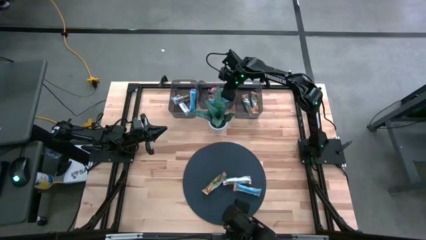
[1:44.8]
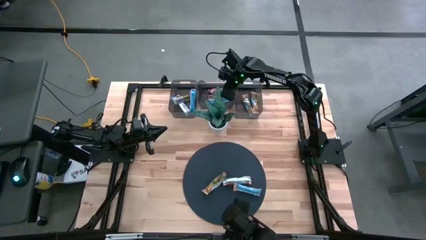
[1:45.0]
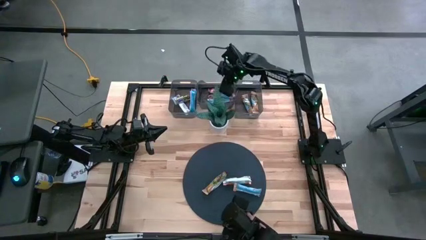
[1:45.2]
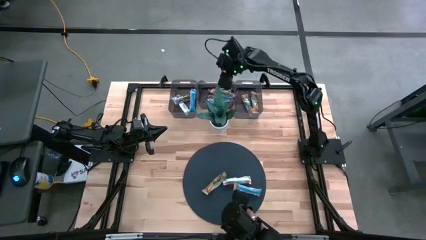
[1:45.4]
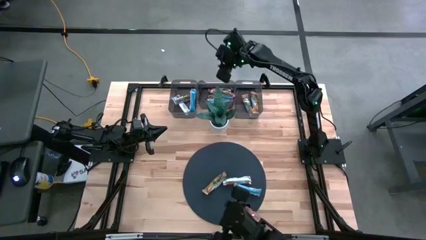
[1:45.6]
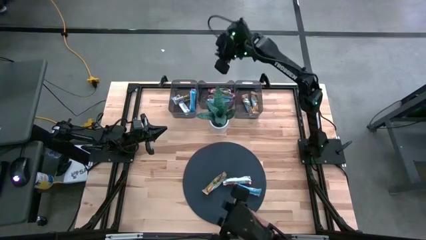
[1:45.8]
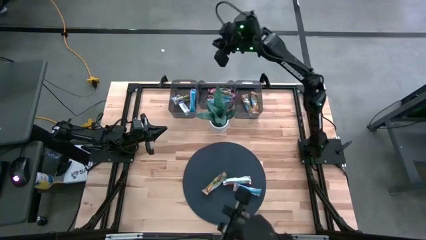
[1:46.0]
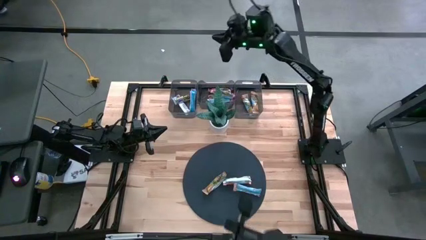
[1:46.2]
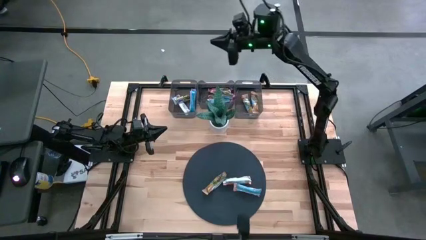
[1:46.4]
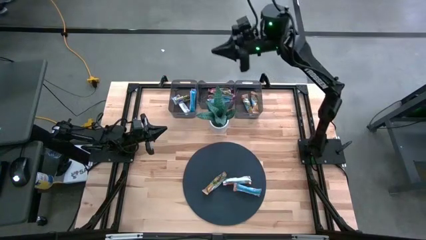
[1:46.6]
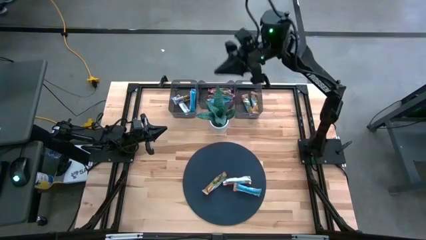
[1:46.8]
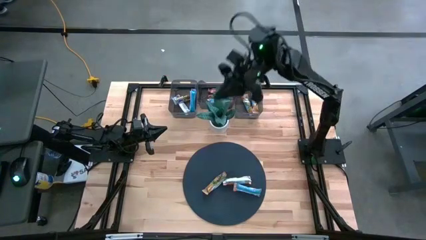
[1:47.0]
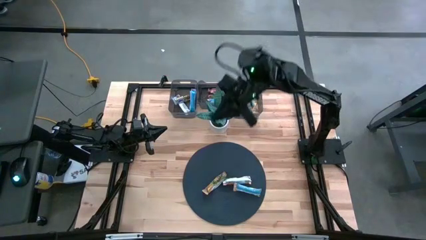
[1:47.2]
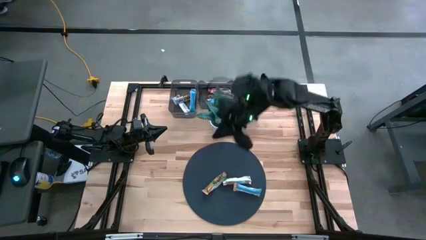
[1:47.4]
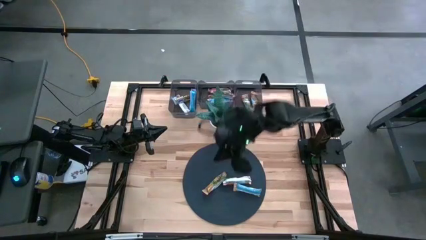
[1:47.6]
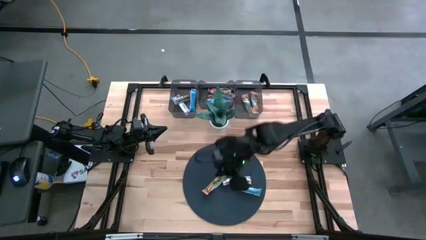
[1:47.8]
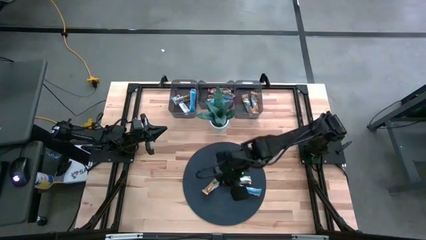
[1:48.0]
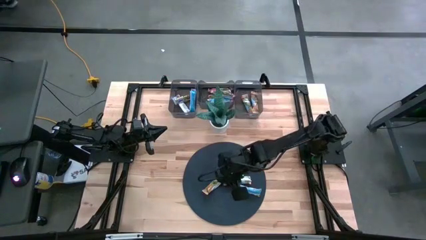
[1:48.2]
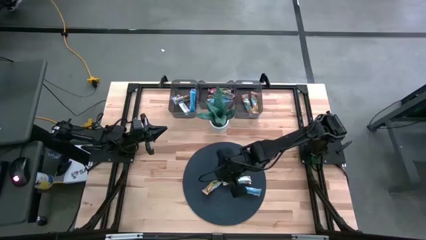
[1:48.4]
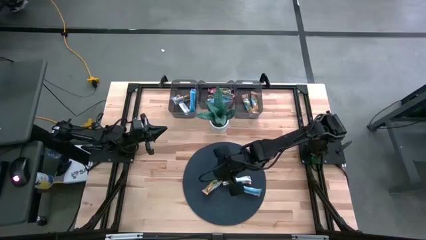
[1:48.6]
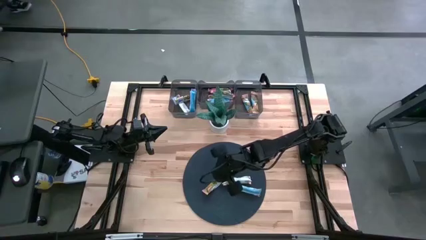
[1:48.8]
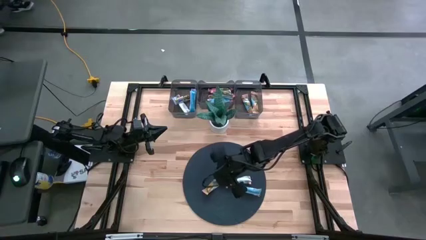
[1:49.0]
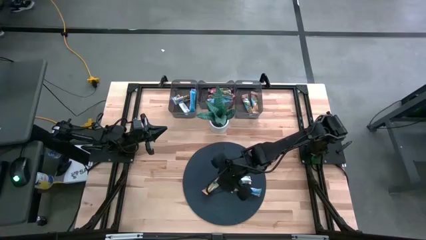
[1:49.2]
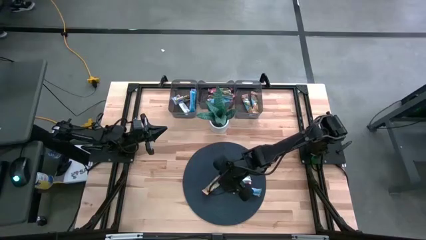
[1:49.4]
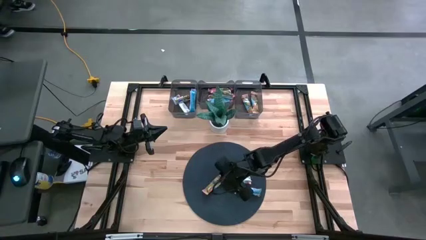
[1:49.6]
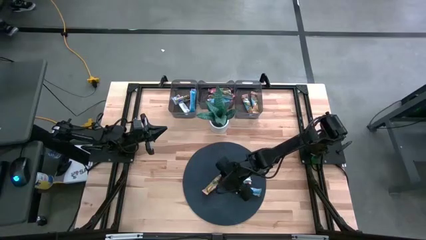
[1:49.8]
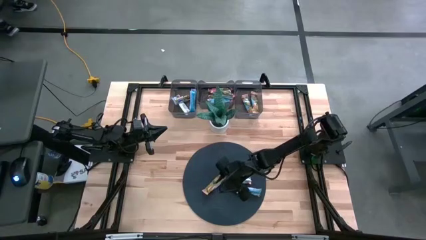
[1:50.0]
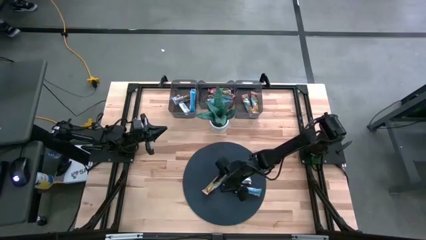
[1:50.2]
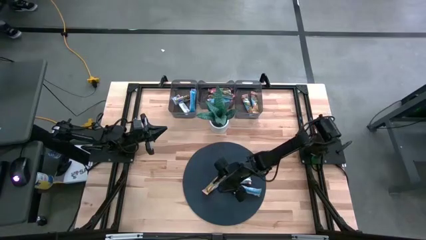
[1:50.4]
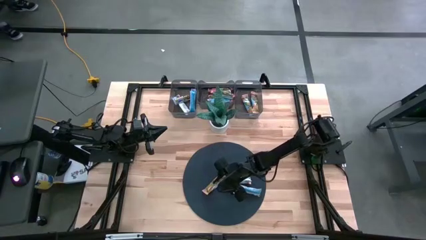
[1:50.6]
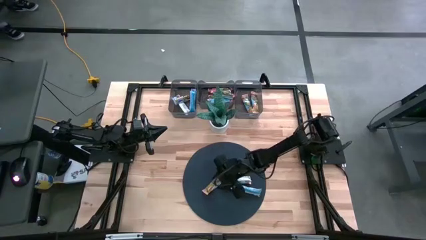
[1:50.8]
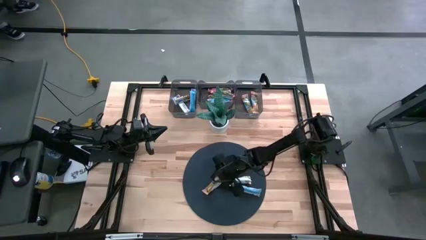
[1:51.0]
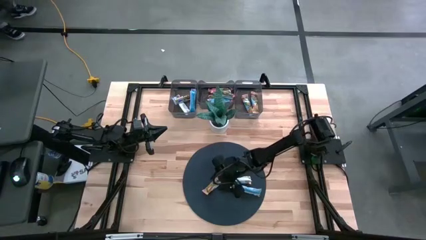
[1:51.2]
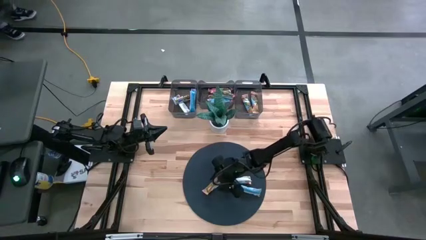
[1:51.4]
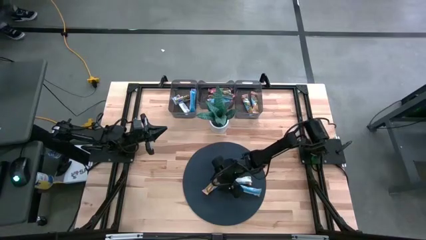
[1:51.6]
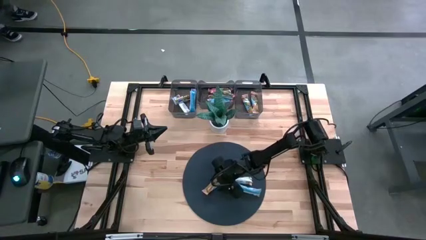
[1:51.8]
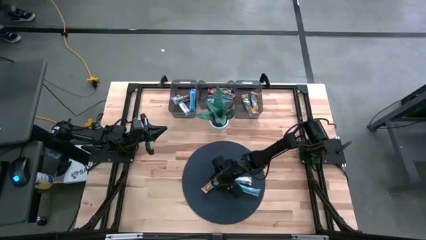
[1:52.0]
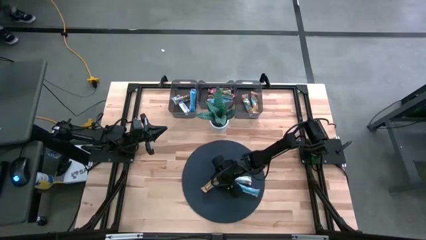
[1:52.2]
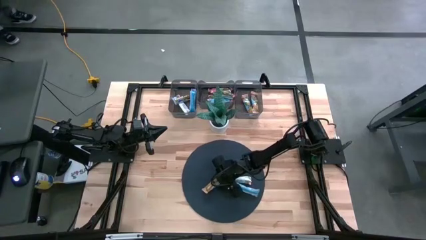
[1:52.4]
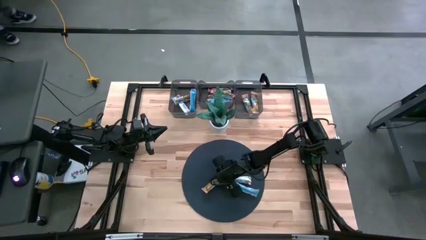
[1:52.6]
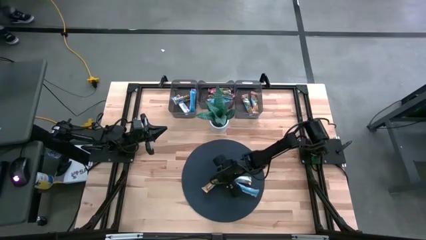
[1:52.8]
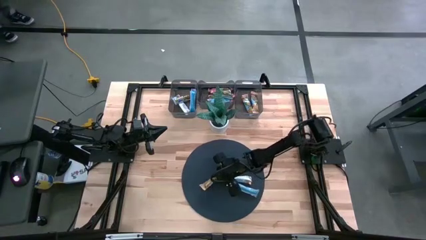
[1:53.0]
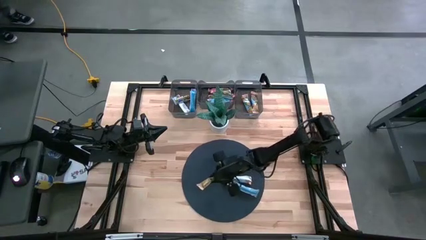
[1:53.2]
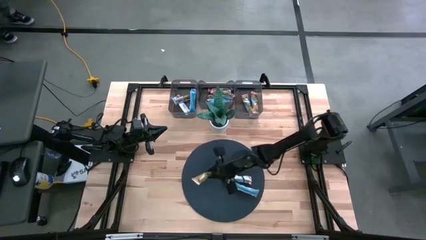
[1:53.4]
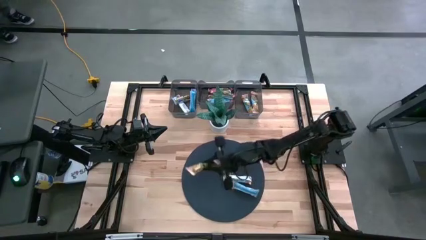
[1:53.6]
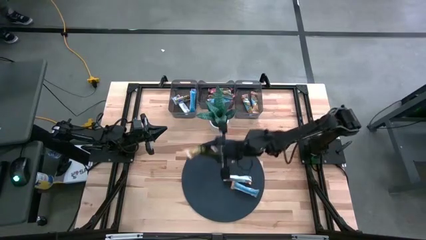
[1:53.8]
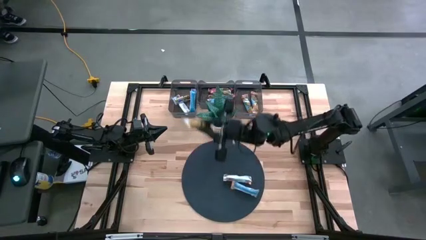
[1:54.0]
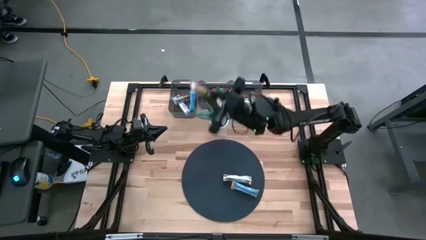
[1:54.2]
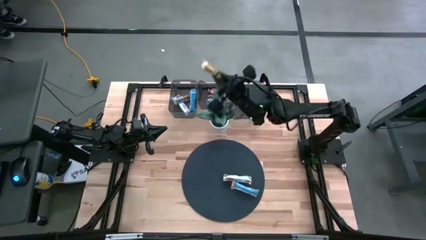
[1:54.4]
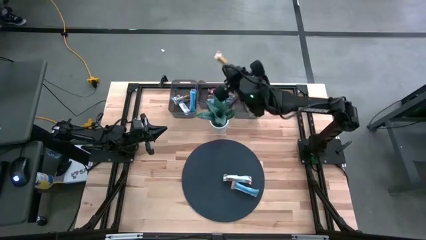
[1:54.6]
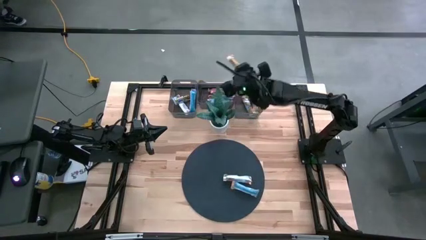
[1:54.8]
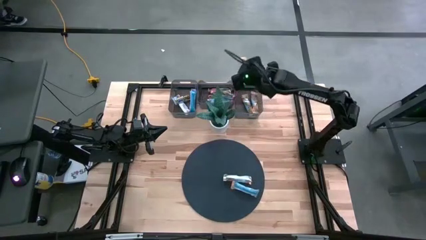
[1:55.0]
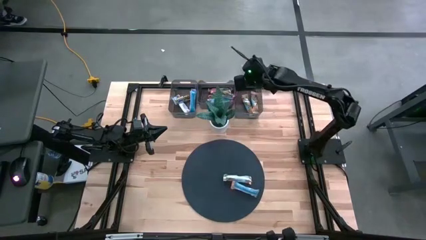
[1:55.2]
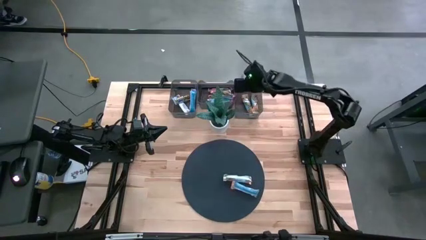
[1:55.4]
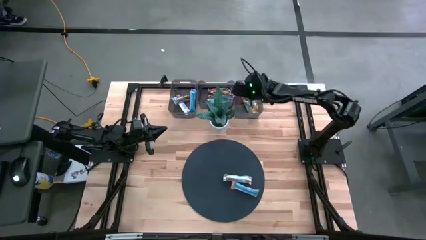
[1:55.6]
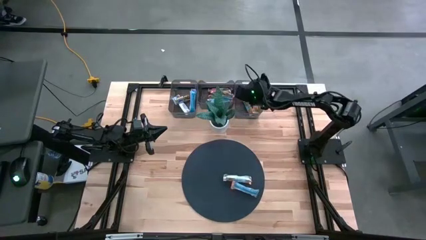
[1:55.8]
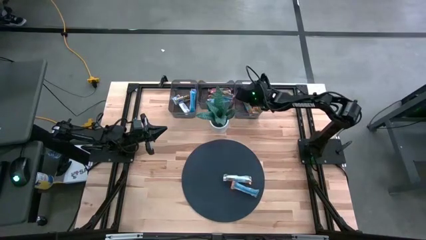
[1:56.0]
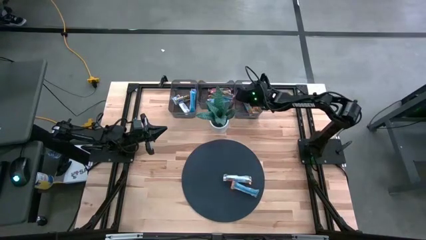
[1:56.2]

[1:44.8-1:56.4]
Task: Pick and place Granola Bars by type
Put the orange granola bar into the right black bin

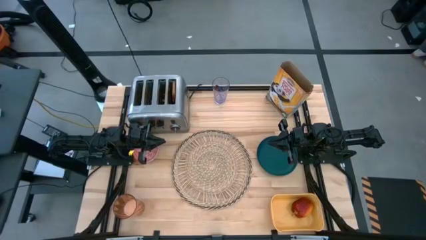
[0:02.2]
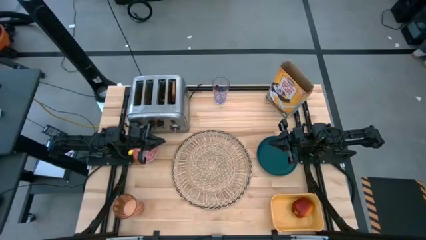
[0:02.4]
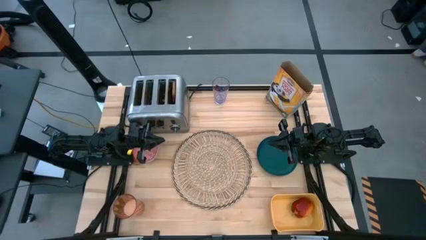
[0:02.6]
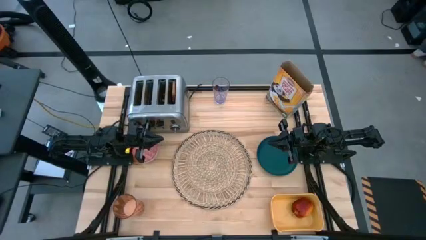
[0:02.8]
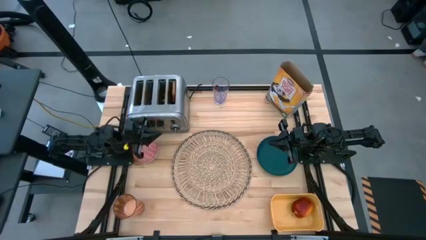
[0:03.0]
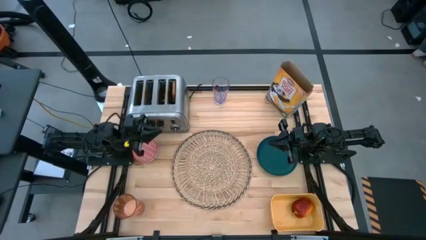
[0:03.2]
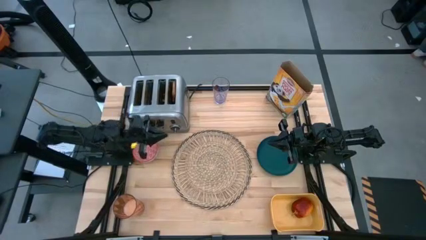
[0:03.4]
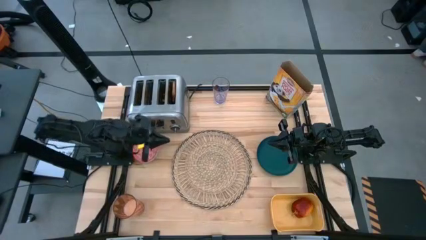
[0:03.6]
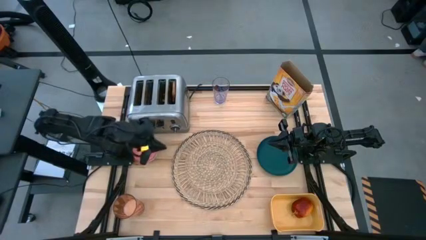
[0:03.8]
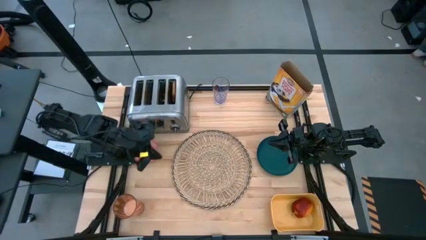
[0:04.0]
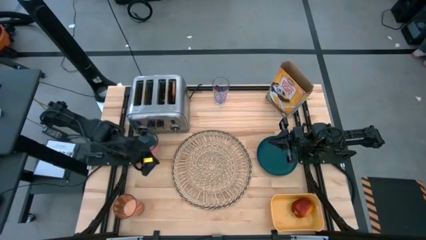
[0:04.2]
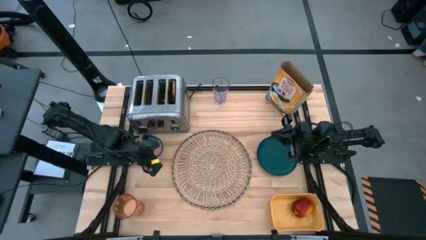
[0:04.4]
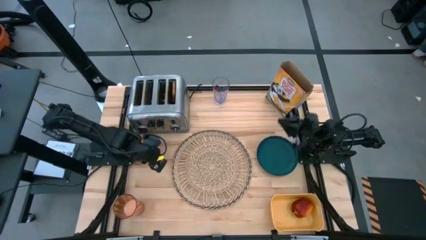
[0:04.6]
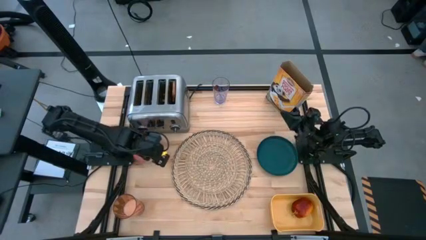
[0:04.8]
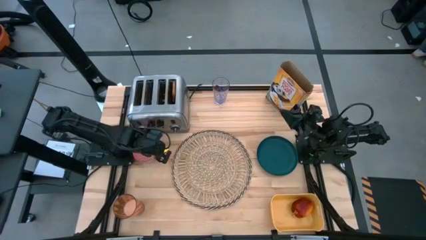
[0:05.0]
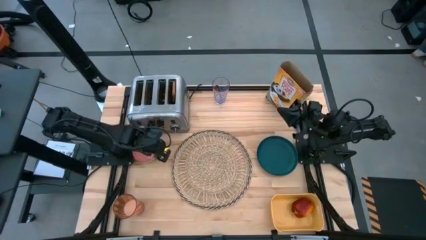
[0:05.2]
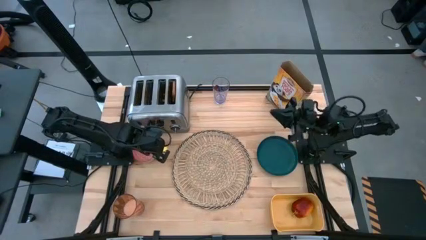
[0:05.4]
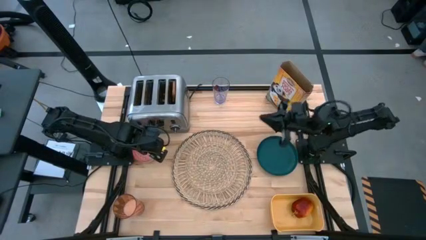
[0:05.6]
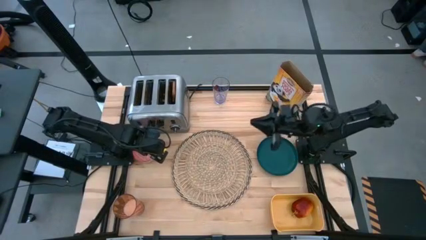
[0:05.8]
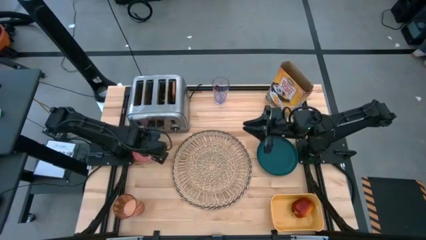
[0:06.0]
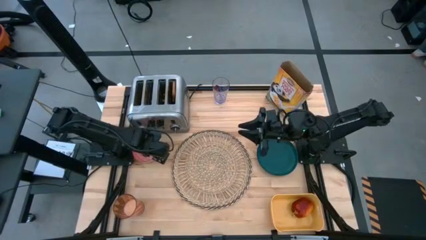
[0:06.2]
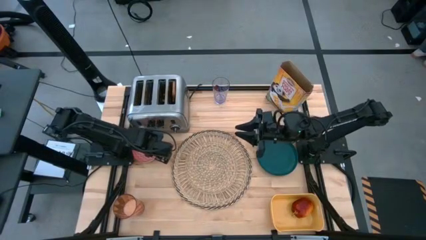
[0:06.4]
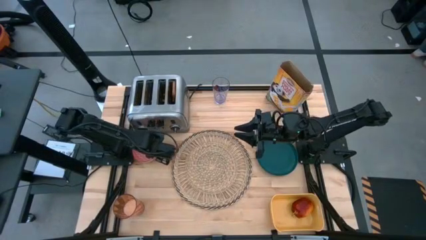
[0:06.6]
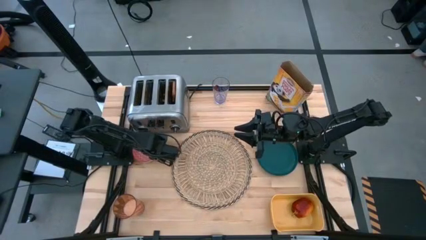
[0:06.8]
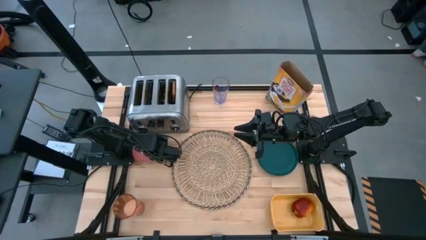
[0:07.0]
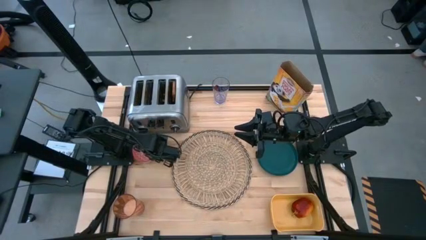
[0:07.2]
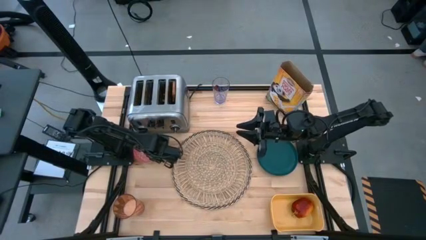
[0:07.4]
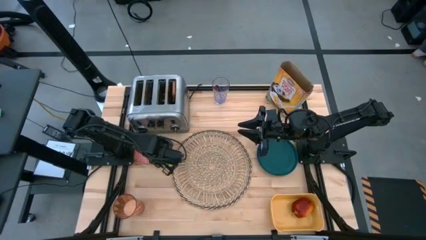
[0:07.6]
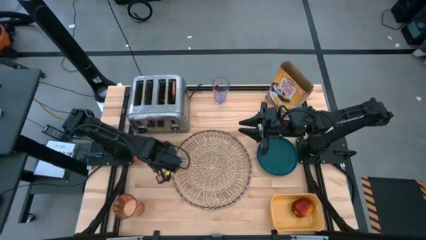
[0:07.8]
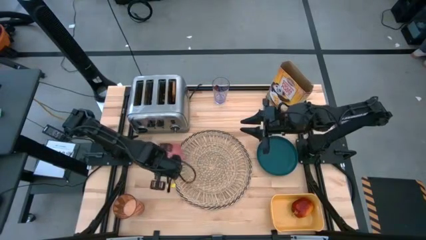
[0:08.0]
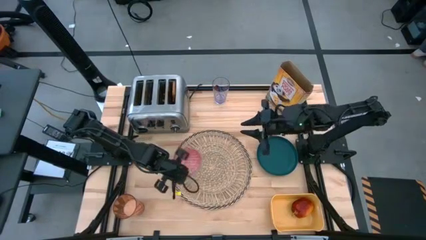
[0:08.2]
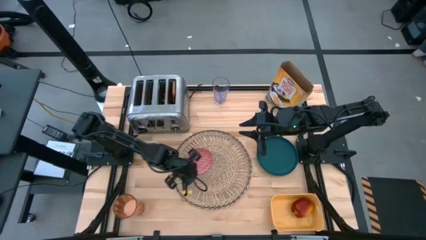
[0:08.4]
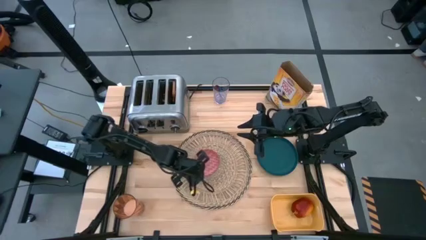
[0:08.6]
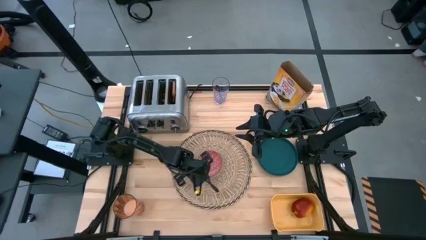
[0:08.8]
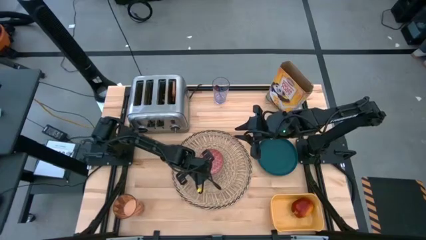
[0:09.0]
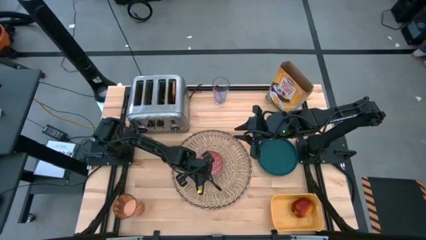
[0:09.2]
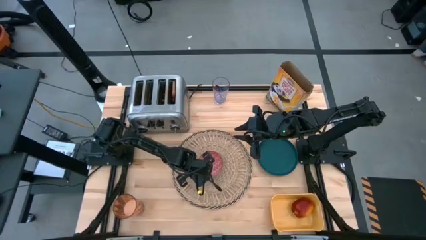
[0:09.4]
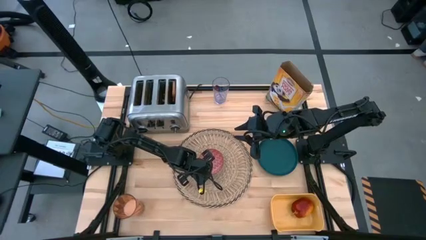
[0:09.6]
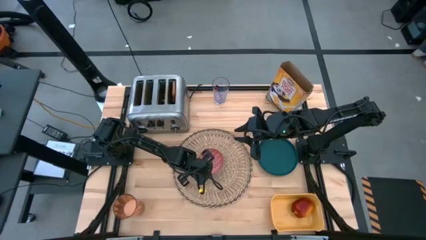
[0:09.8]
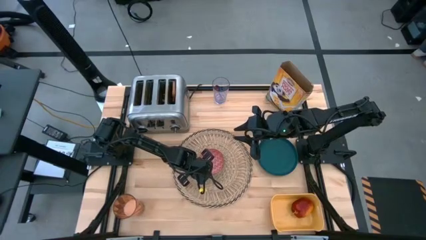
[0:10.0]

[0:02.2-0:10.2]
Task: Arrange a breakfast setting
Move the red bowl to the middle of the brown placemat
